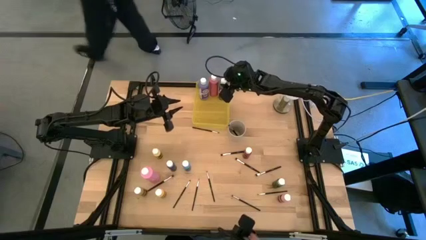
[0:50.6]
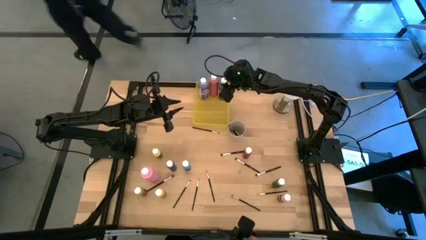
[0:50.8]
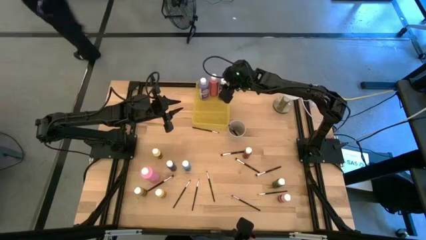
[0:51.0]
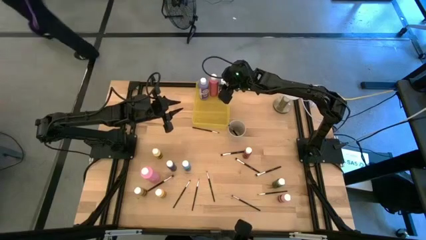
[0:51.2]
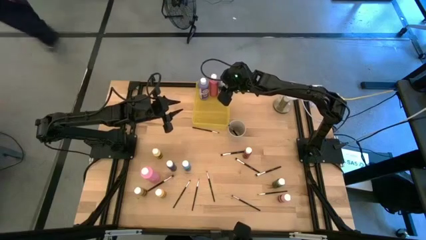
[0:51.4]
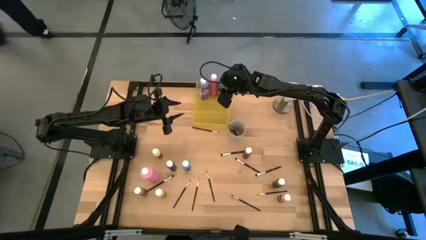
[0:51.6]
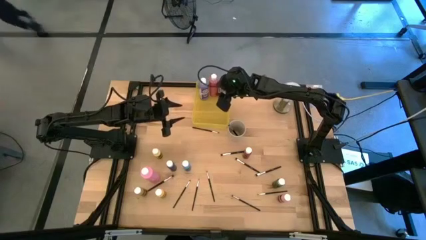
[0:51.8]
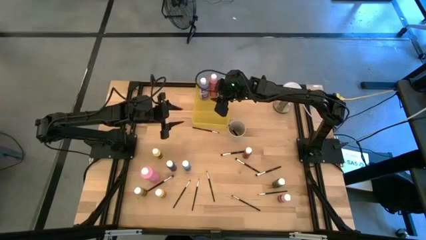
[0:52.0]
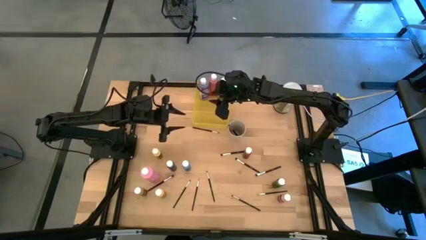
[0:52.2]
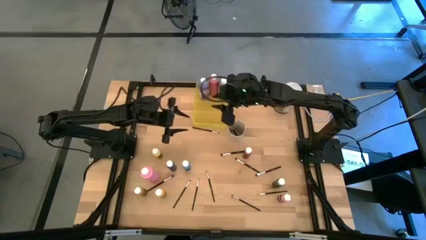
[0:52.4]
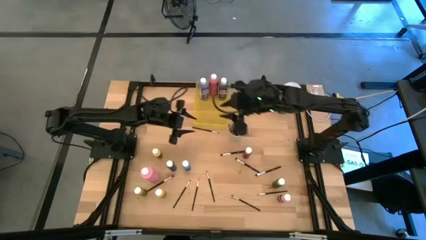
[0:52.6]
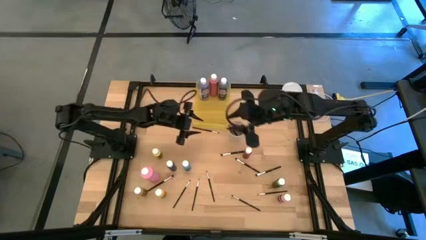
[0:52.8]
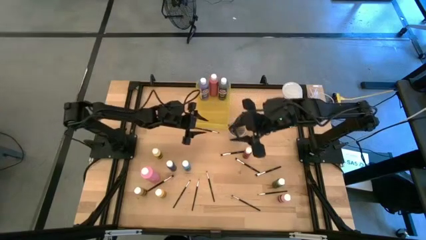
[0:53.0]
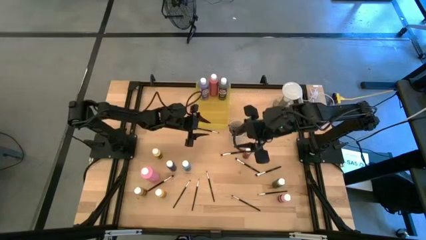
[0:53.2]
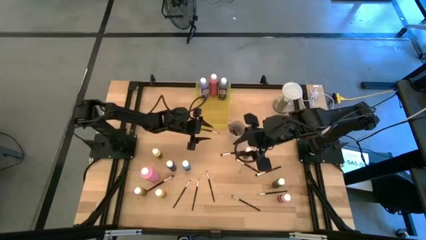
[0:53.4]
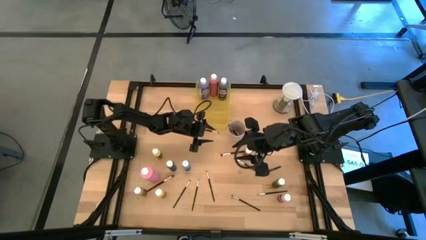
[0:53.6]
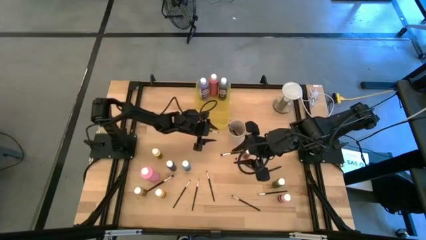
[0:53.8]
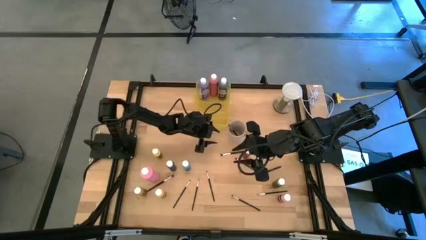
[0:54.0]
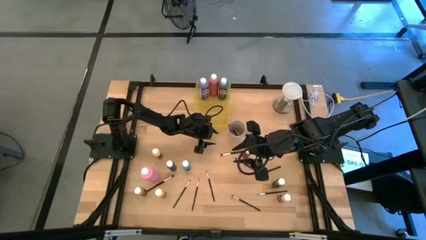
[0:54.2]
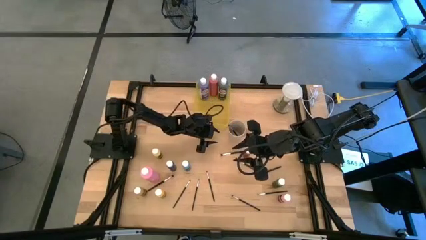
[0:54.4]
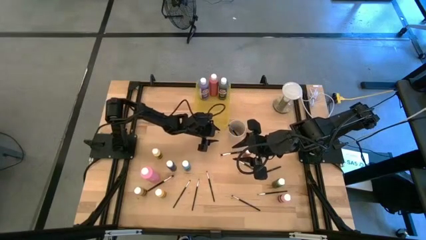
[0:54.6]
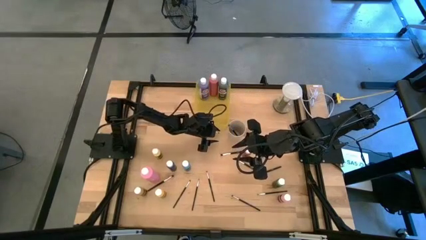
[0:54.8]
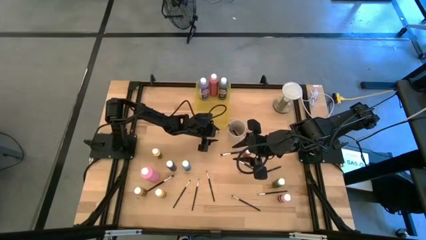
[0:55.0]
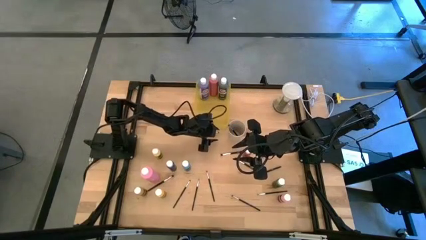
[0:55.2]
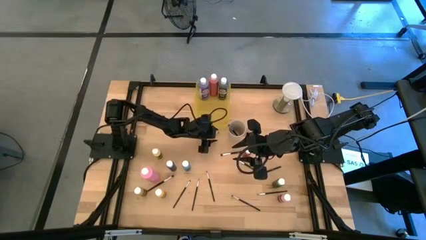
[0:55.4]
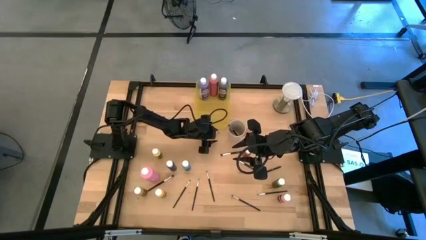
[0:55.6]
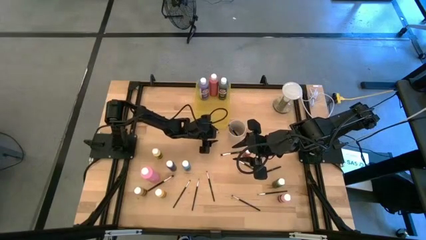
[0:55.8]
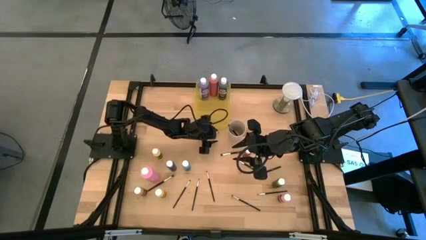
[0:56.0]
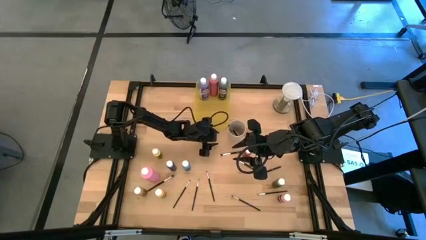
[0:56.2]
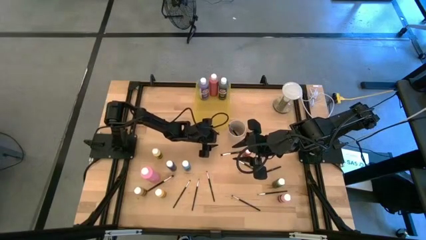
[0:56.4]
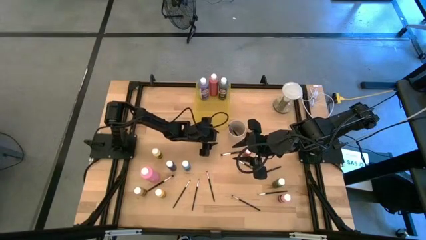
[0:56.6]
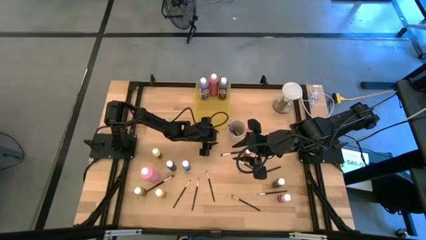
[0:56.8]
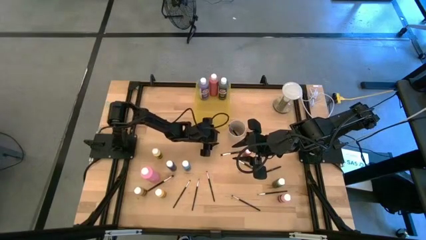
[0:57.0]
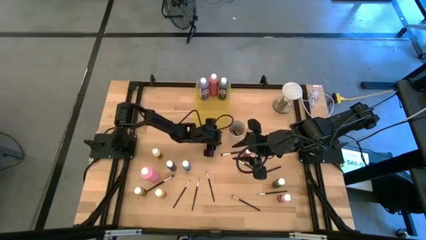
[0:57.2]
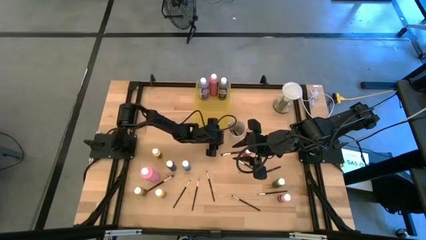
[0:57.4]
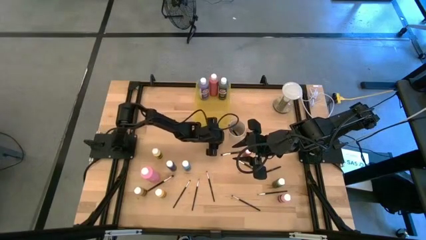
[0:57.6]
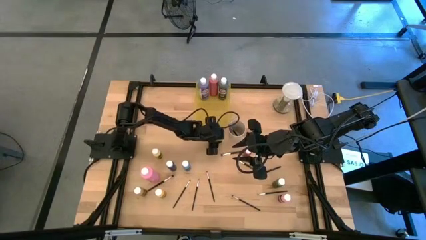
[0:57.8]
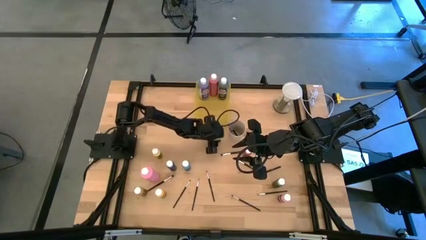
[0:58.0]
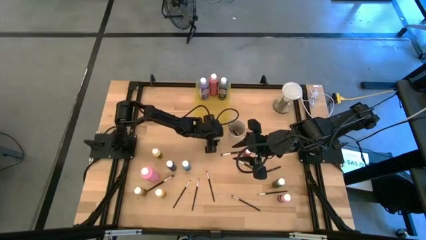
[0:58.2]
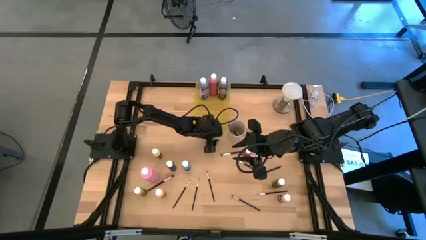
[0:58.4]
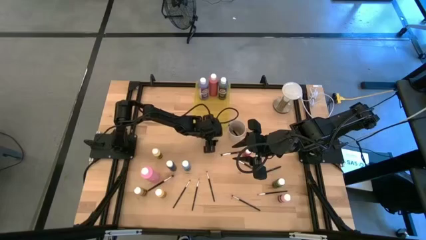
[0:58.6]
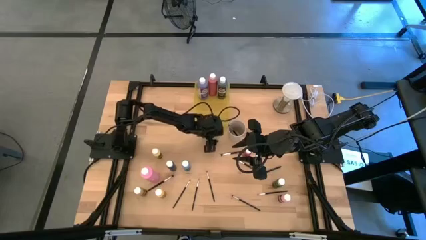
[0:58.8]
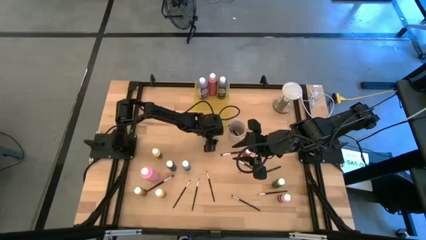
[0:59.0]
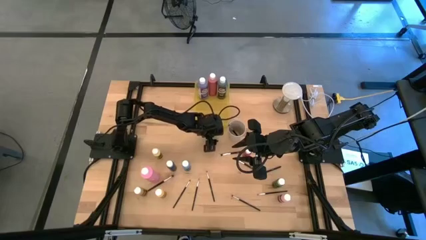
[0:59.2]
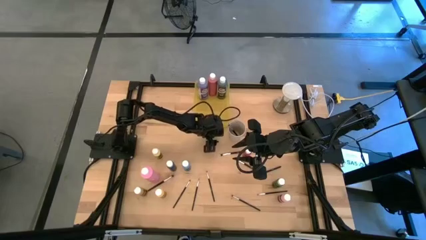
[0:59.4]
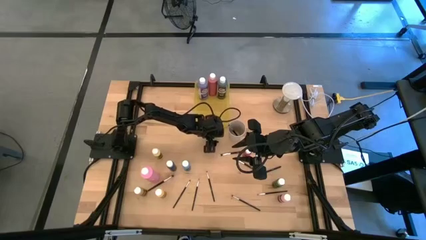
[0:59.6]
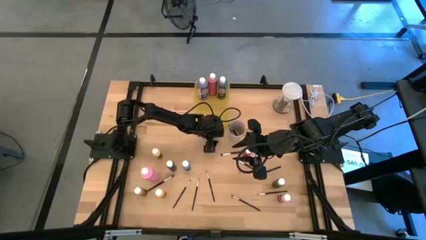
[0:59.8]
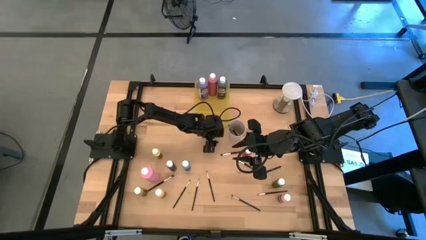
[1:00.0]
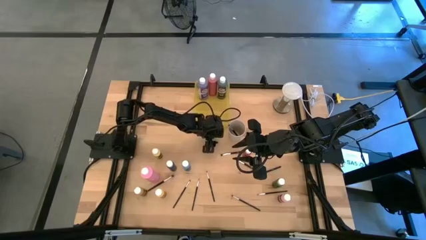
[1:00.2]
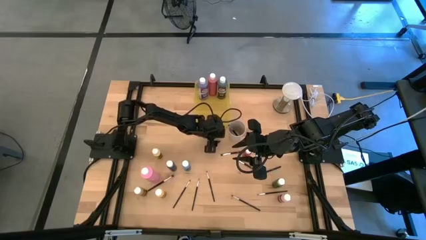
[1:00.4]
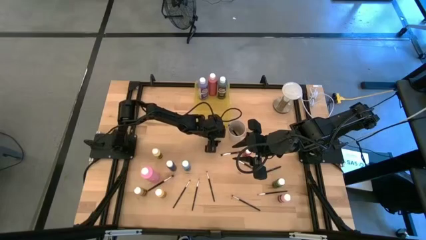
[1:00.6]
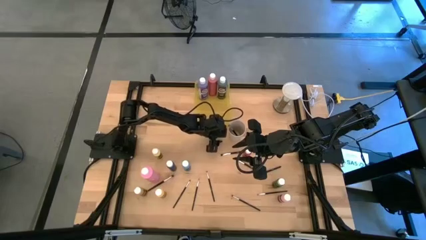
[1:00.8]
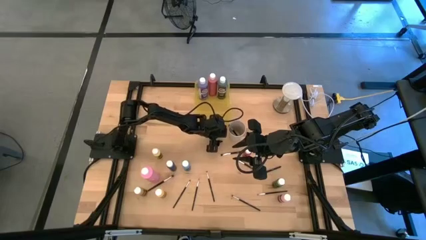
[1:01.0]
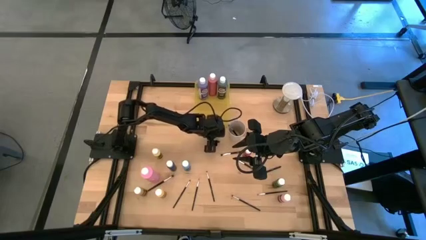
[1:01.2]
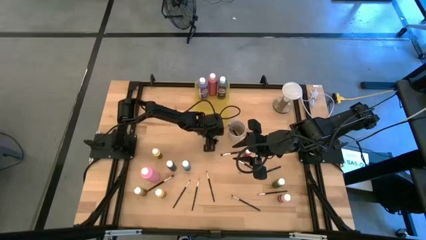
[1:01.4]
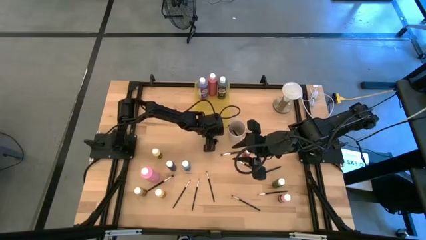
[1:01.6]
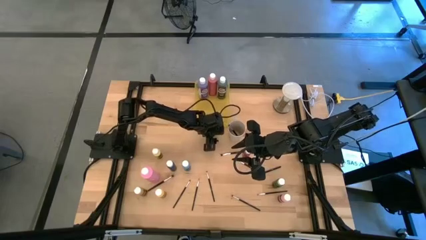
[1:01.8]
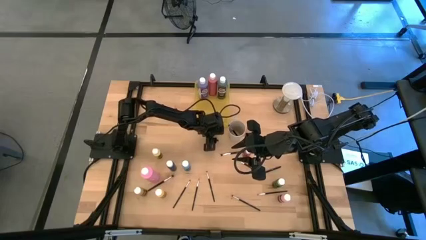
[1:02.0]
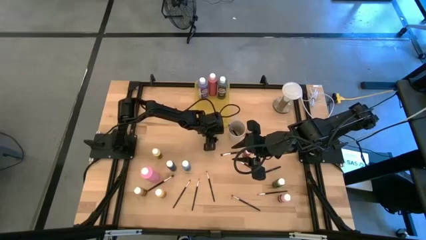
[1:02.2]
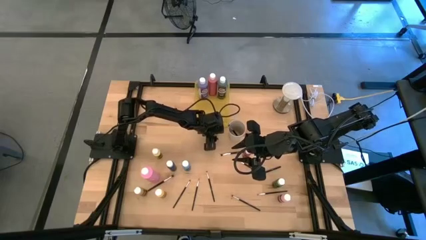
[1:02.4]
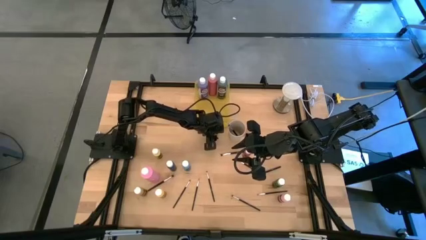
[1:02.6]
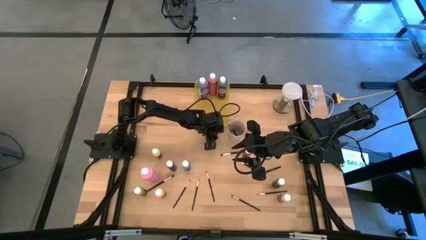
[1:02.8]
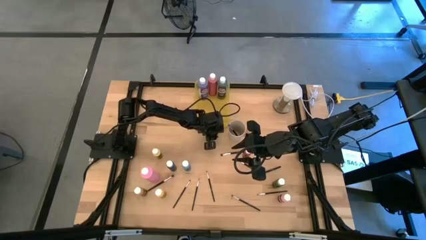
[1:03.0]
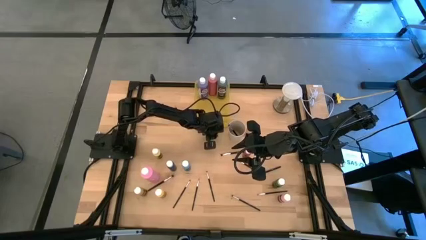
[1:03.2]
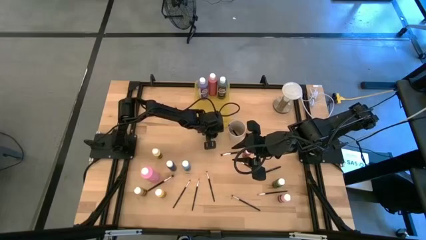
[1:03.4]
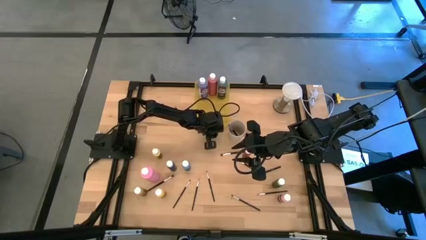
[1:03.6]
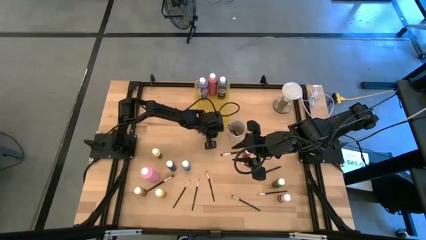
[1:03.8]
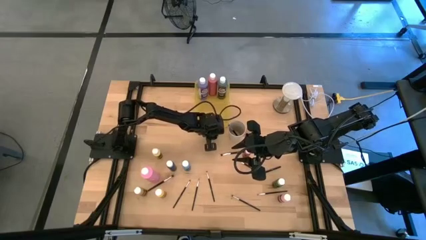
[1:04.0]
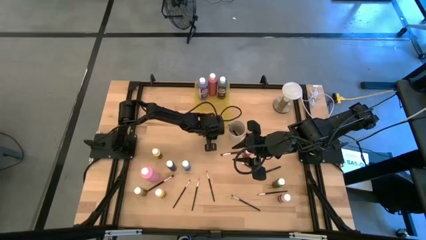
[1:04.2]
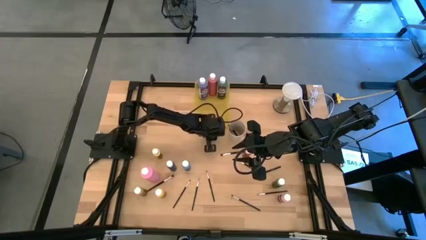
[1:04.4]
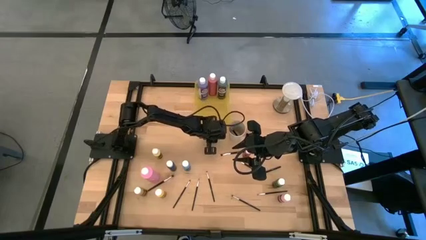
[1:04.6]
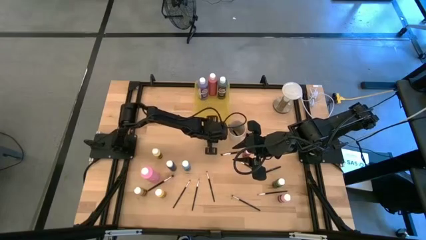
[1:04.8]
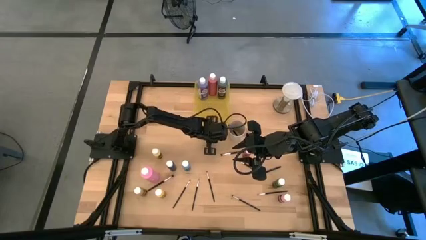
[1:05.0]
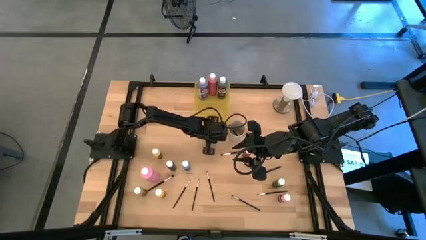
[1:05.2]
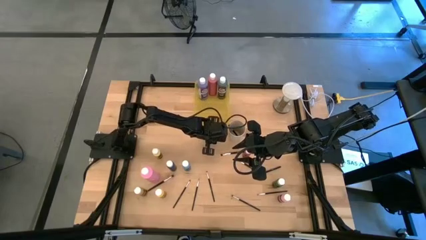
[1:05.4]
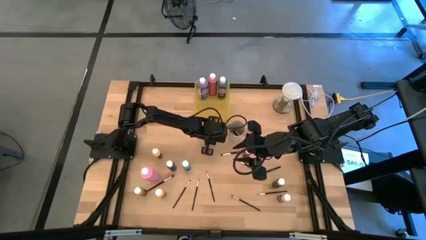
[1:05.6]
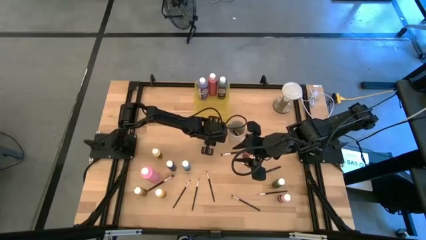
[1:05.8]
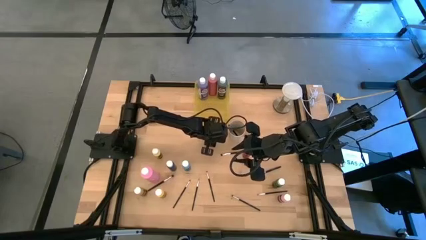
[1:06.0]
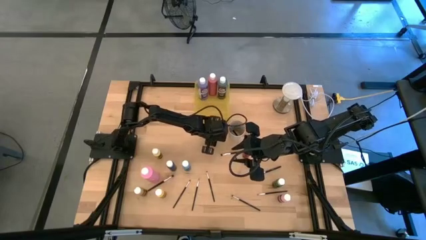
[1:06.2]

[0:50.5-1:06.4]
Task: Pick & Place Paint Supplies
Put the black paintbrush into the white cup

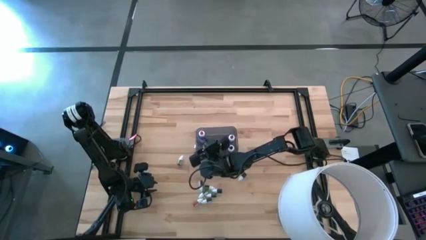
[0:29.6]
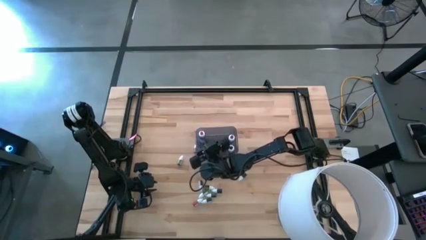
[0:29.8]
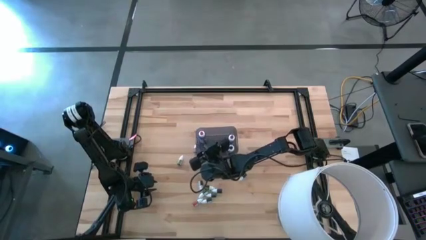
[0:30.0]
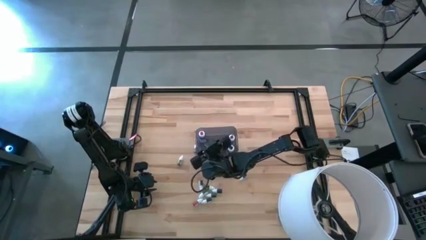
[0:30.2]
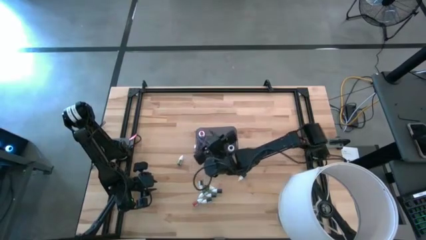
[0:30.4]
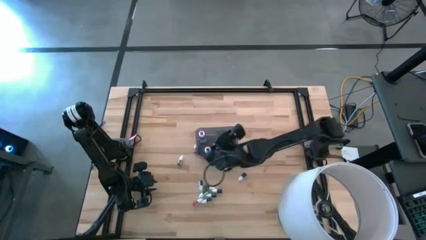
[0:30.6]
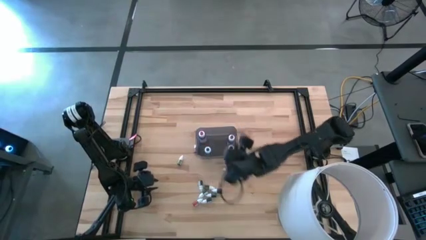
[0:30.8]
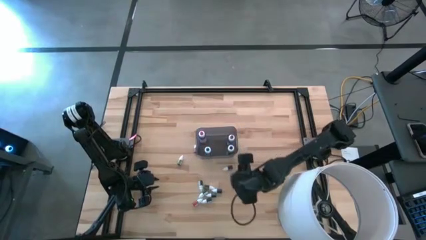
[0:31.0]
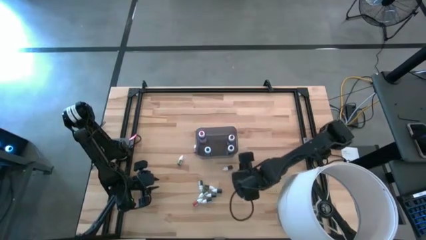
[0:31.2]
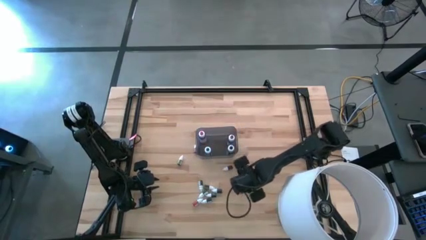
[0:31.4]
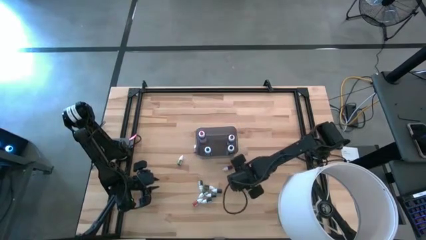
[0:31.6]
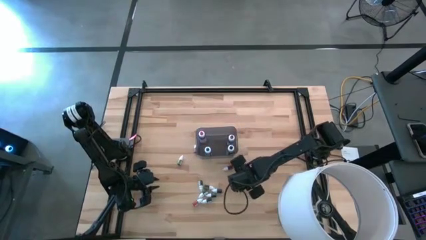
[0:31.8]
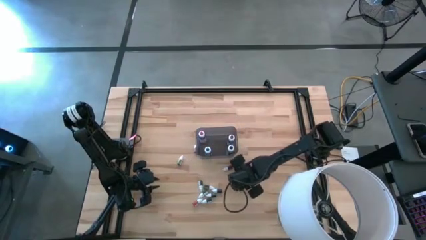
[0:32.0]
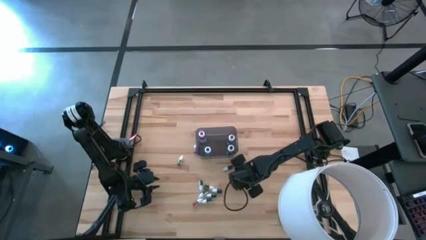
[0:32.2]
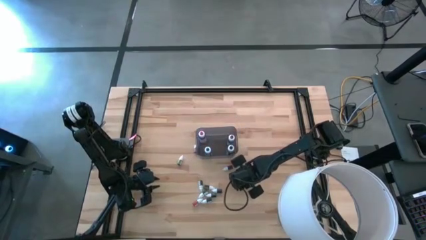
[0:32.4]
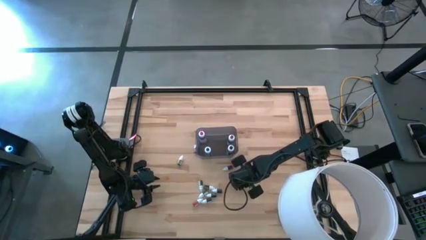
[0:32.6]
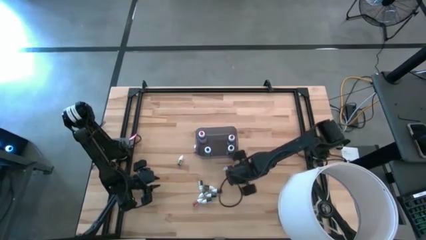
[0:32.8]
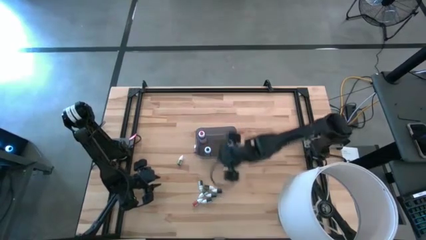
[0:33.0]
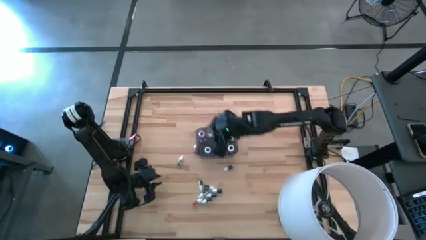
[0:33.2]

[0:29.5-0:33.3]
Task: Pick & Place food coloring
Put the top right small black food coloring bottle in the black bin
